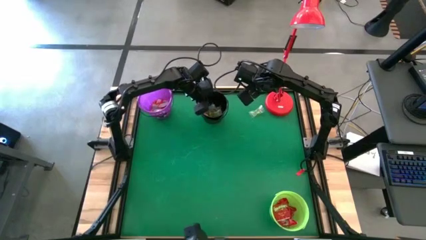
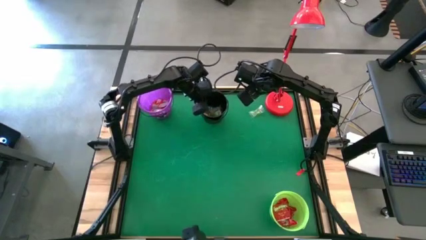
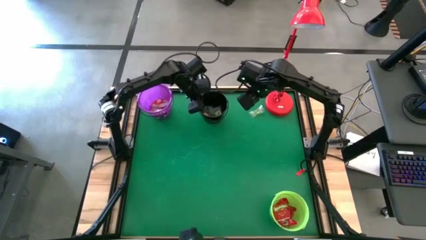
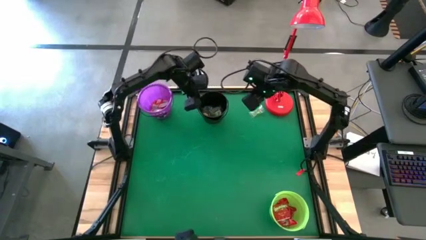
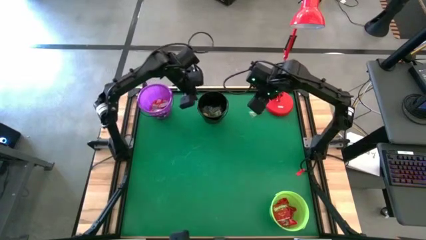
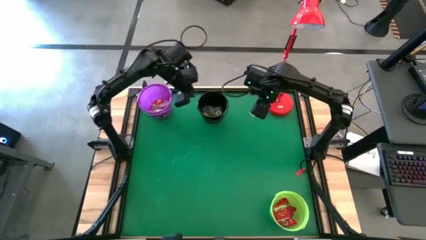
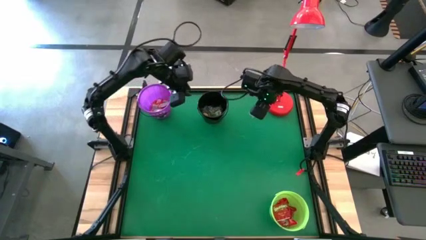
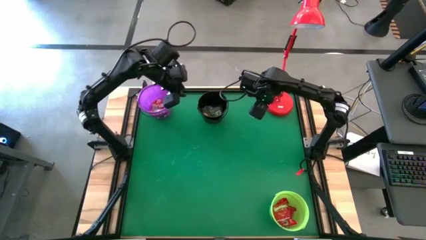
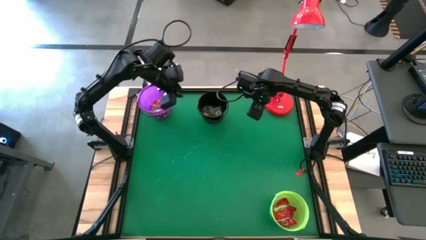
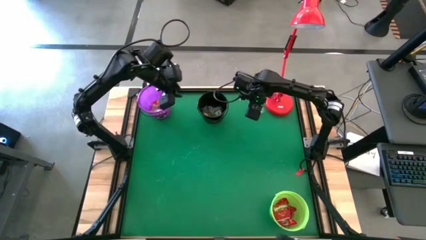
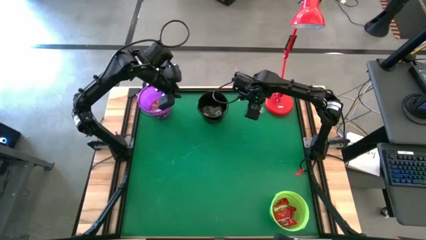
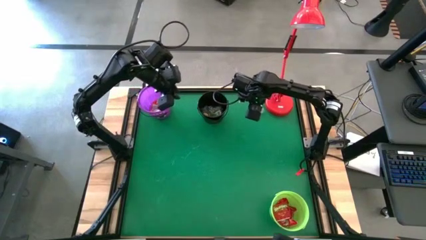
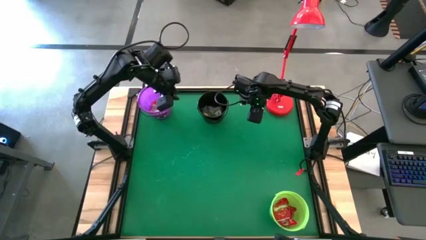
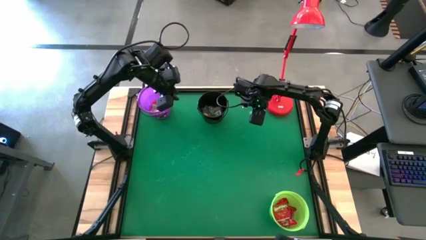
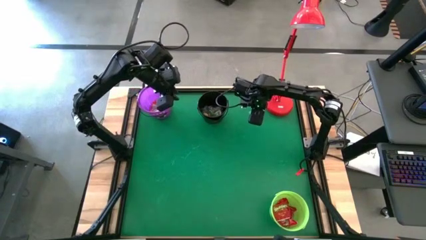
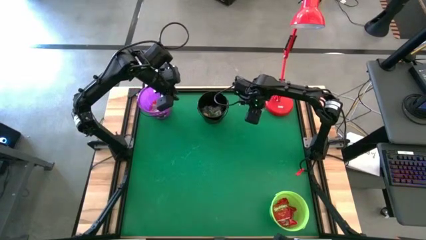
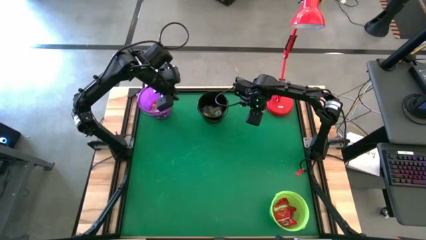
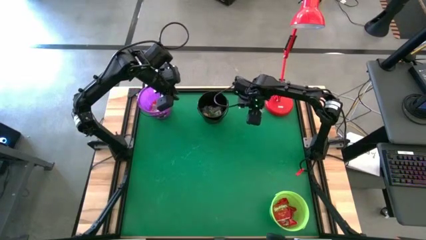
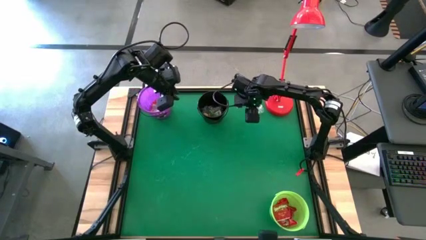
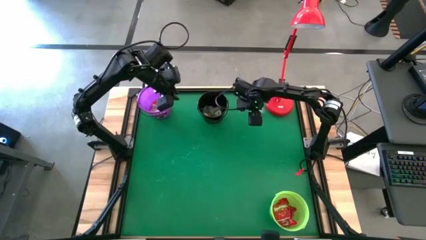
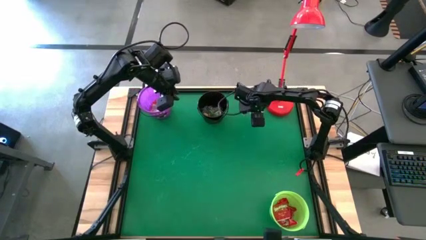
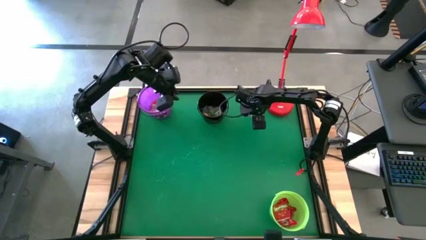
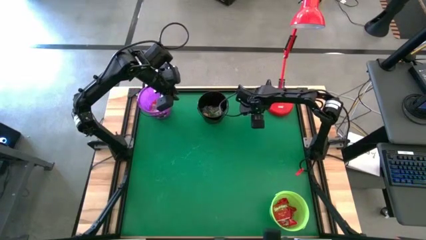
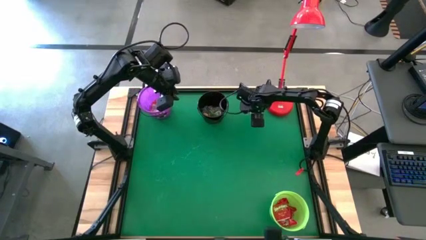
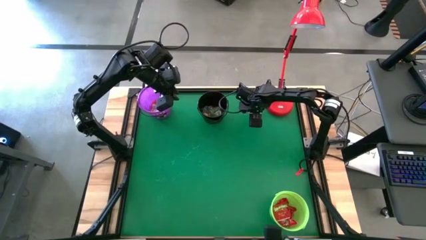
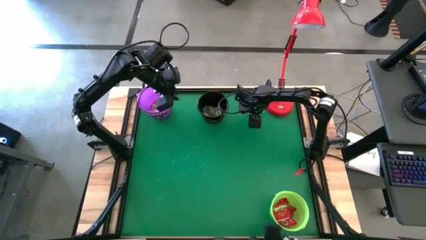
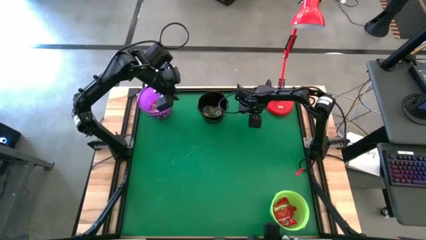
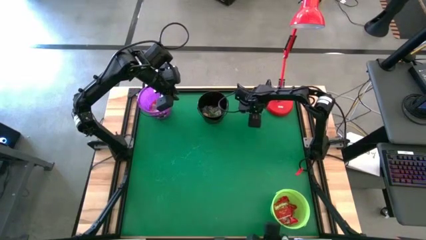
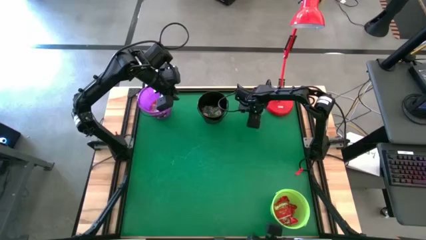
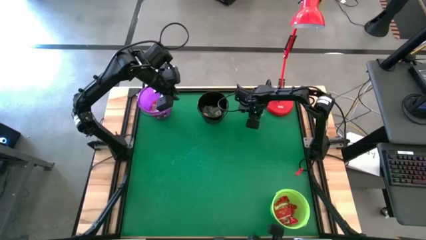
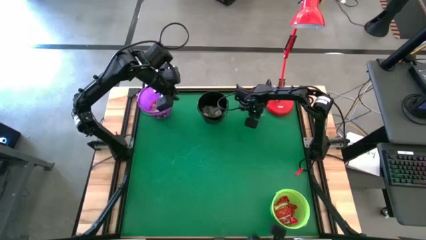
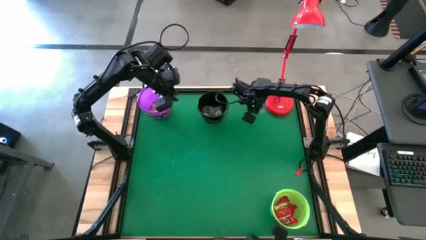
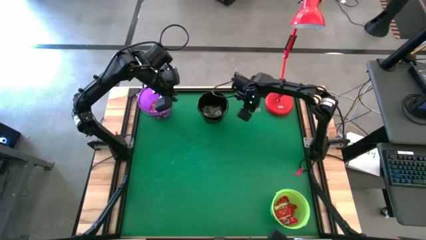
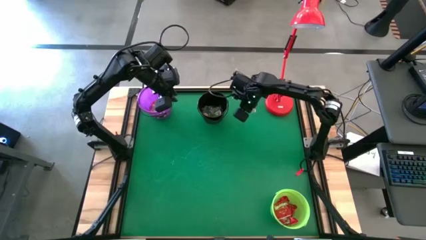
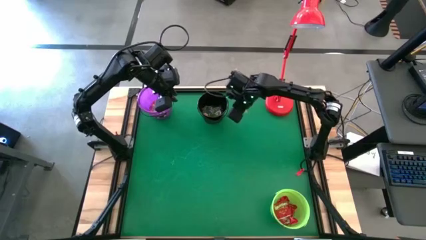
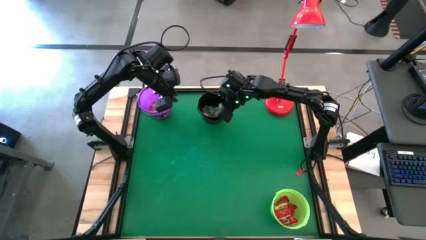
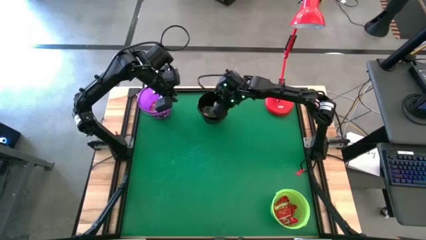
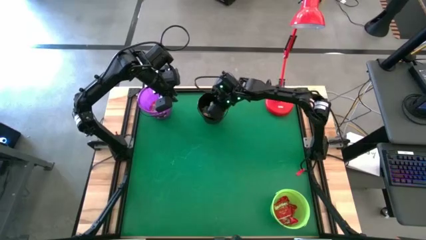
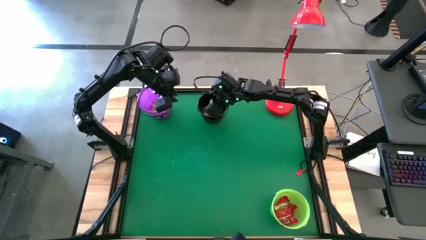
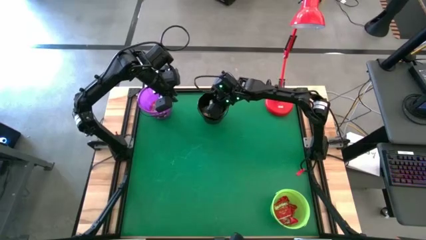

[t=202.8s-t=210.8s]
Task: Sort candy
Put the green gummy into the black bucket

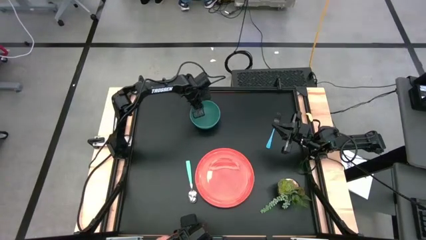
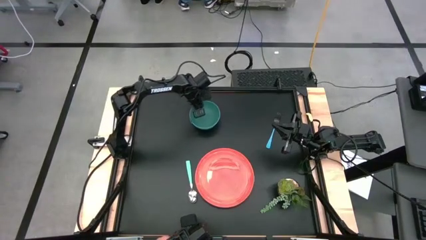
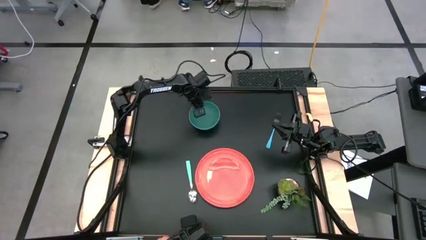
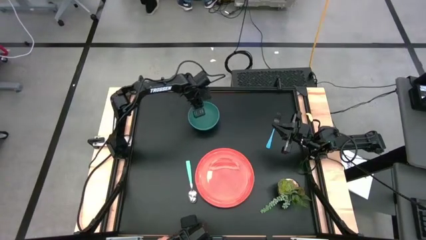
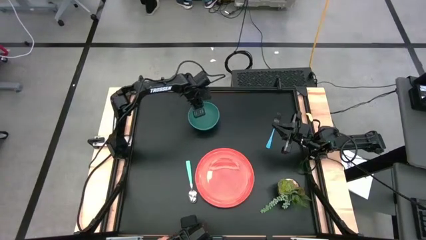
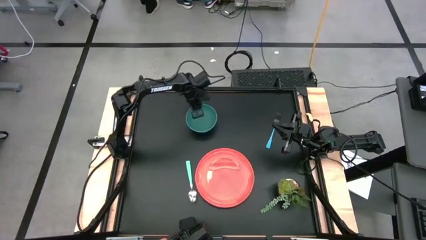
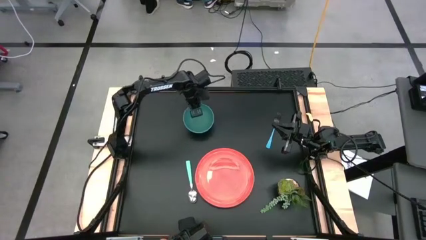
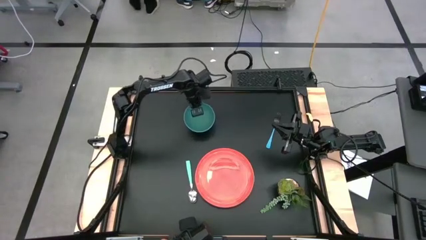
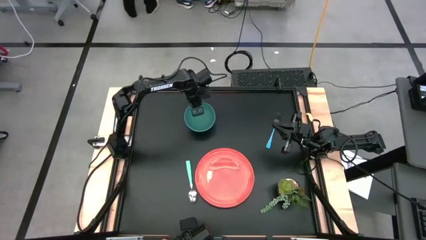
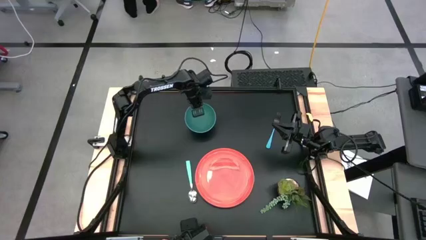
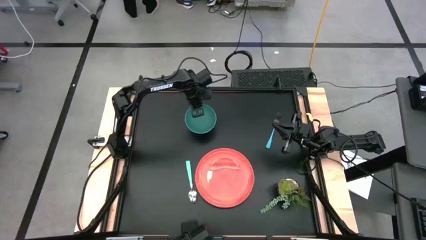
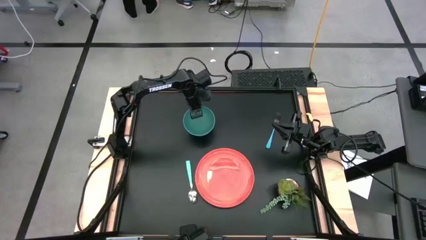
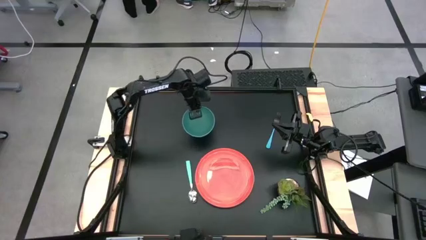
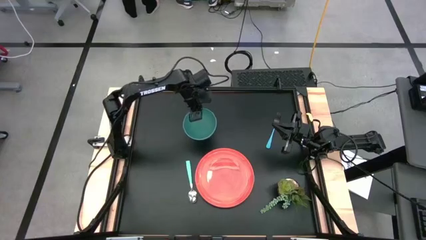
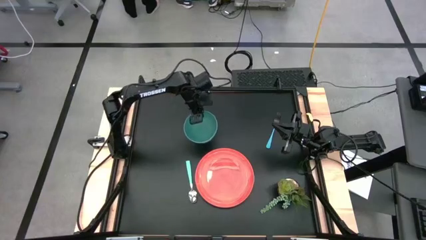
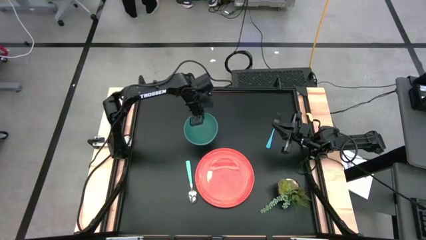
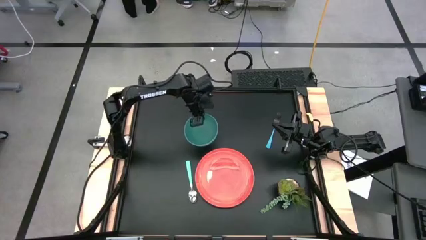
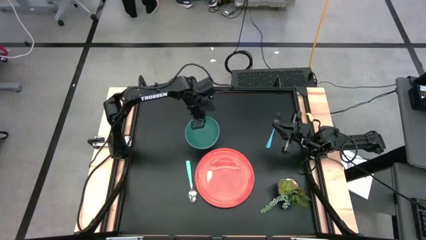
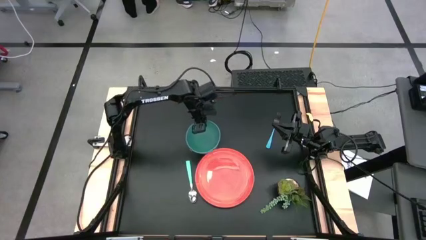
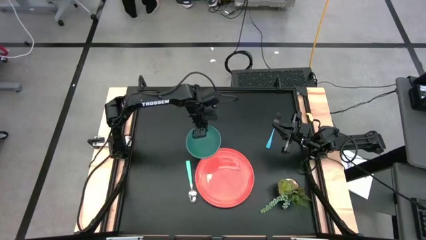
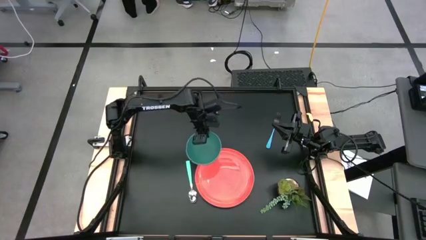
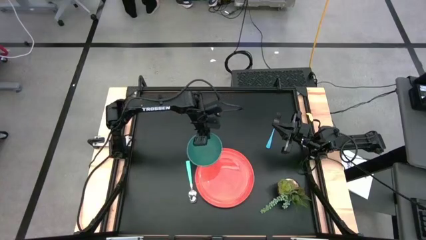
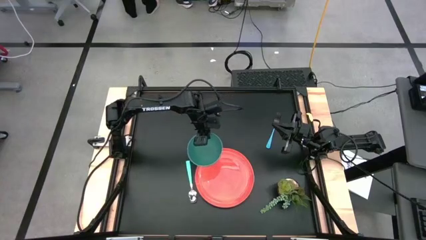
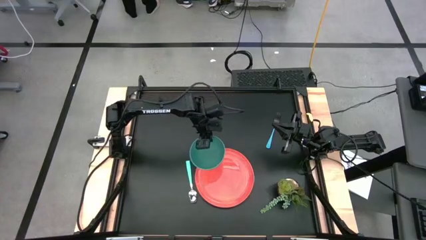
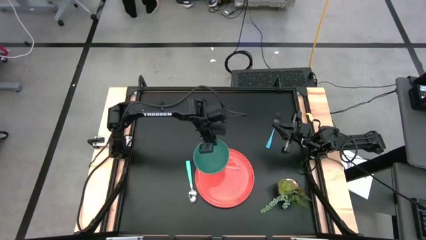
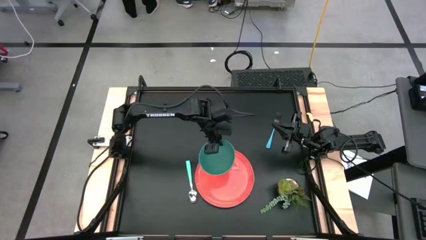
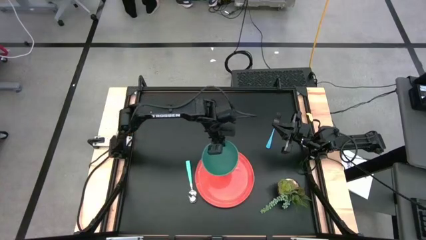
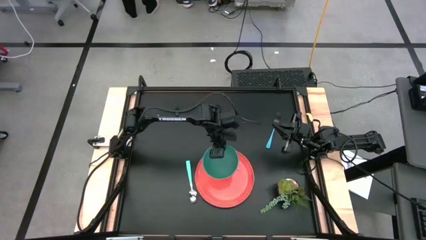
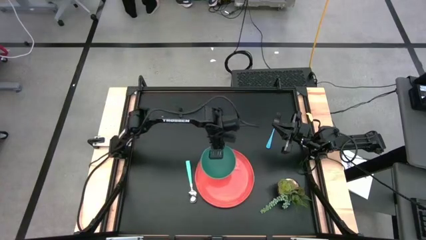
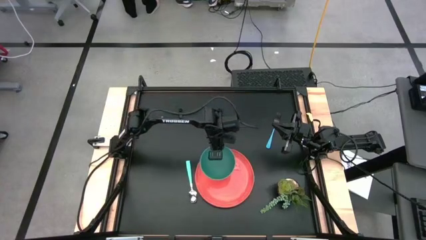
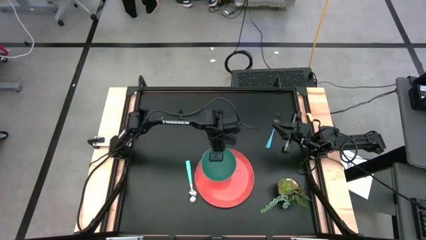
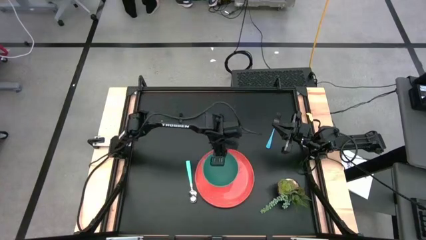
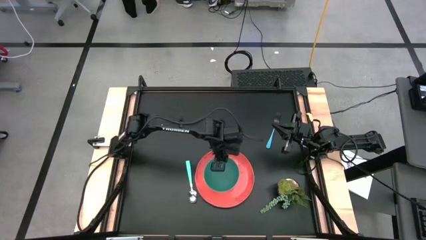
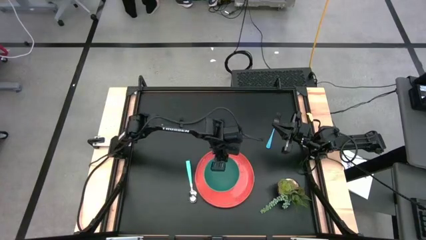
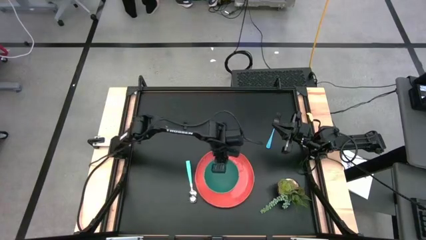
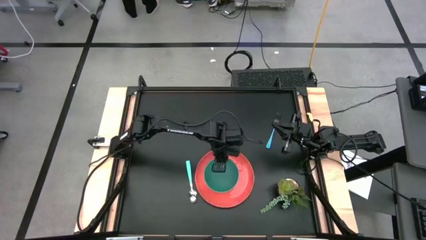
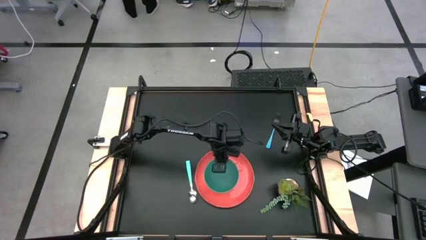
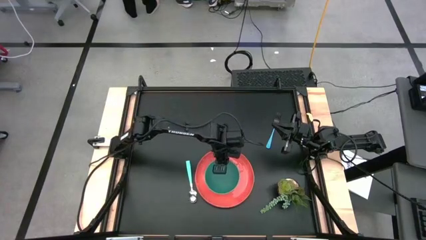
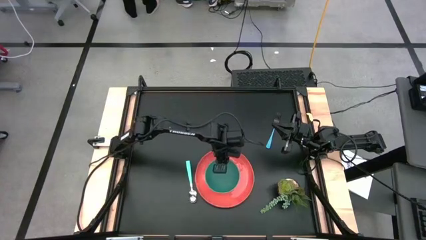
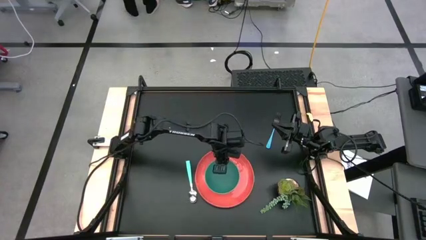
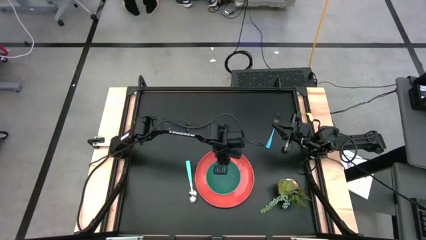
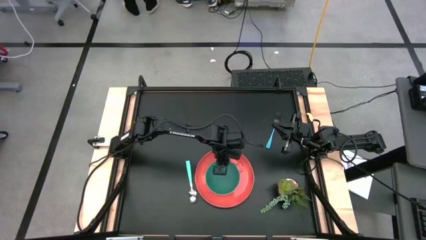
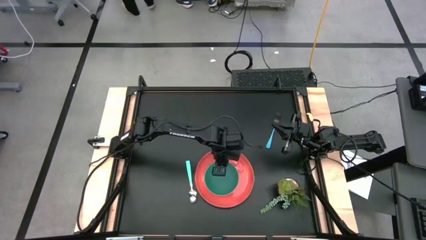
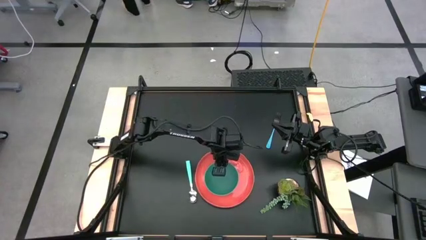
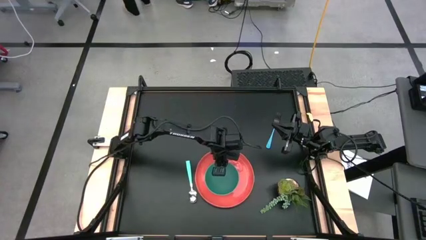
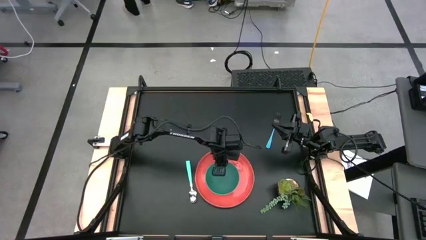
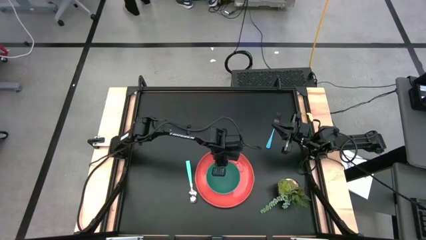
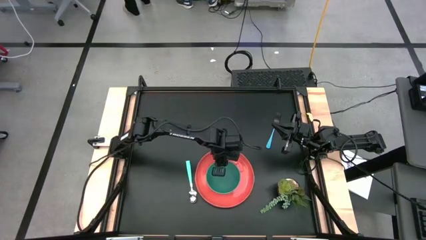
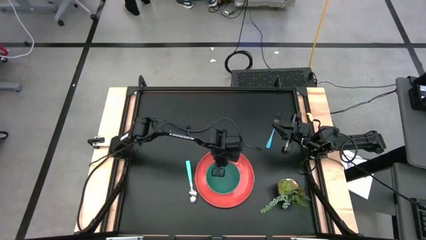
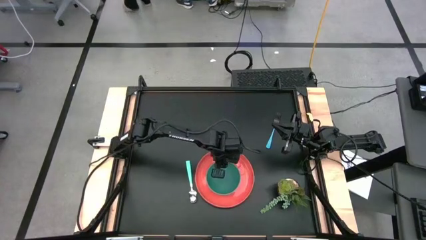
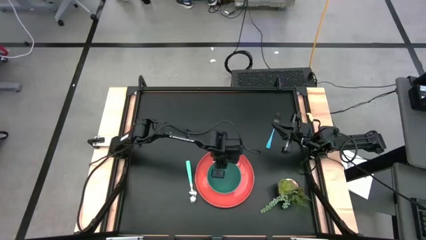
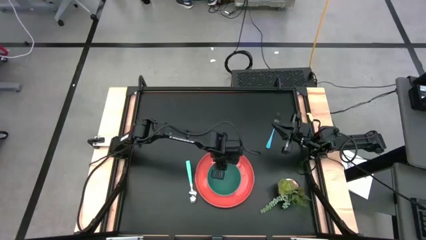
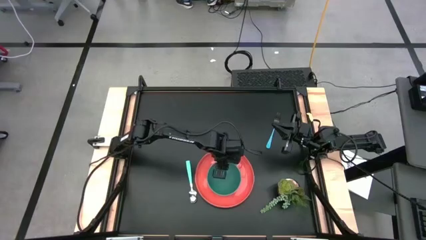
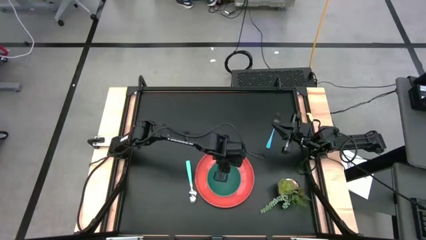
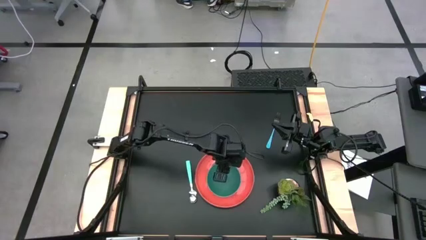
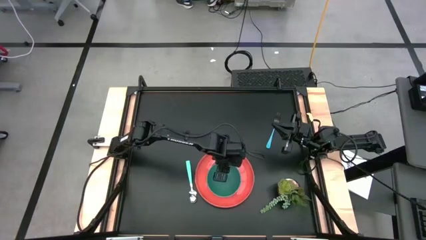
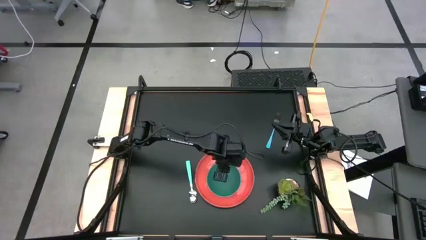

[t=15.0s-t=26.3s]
Task: Set table place
Put the green bowl on the orange plate
